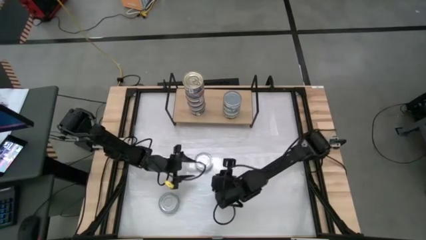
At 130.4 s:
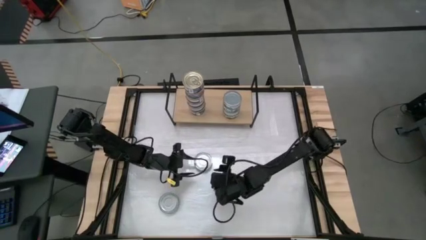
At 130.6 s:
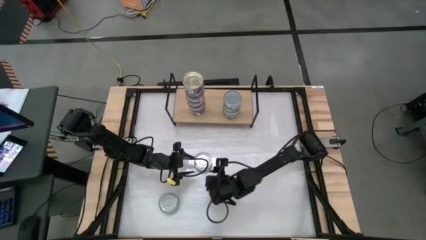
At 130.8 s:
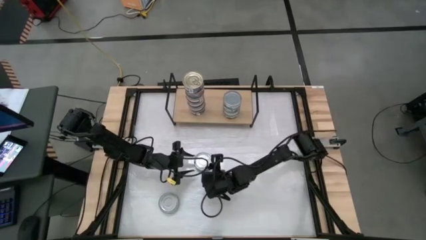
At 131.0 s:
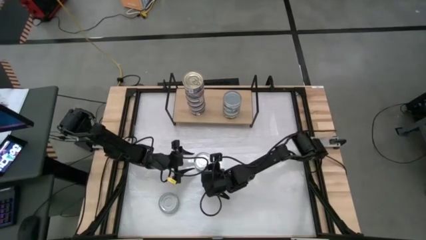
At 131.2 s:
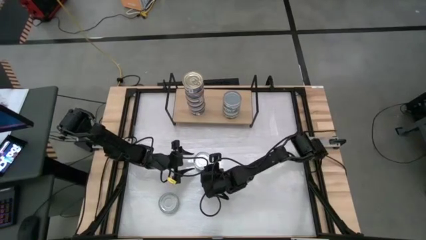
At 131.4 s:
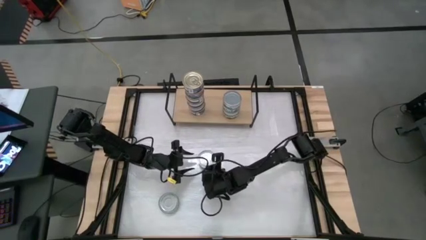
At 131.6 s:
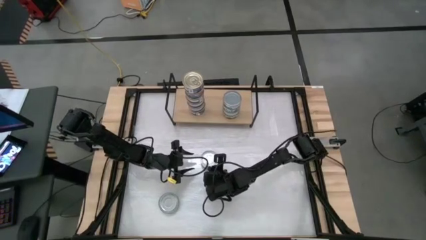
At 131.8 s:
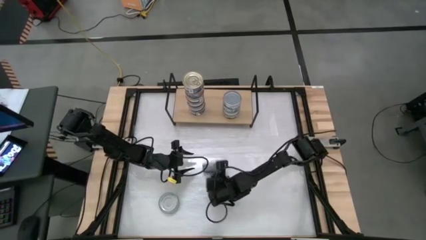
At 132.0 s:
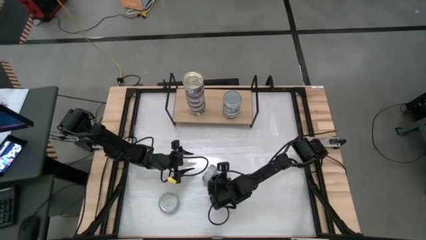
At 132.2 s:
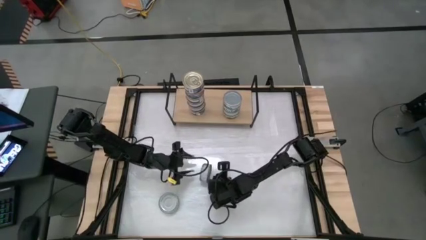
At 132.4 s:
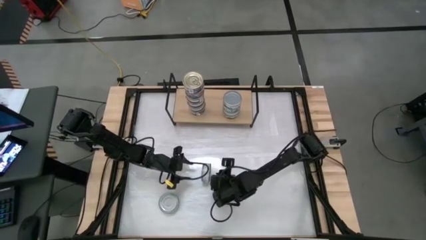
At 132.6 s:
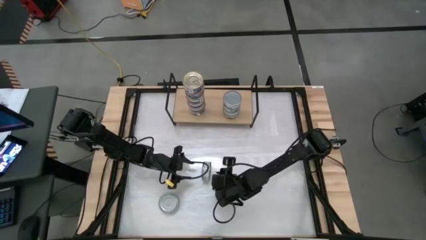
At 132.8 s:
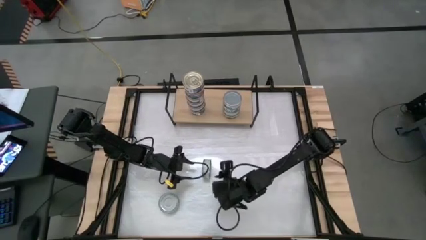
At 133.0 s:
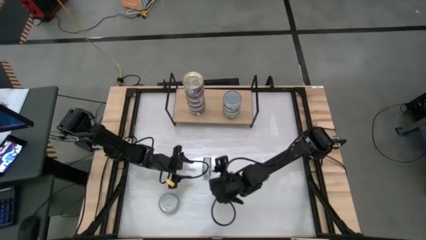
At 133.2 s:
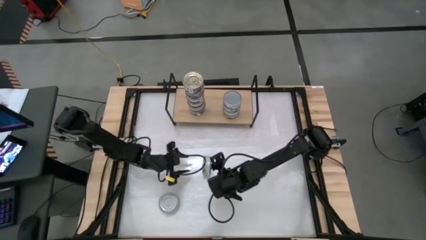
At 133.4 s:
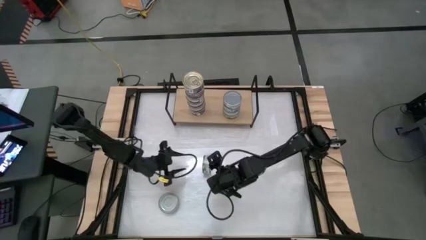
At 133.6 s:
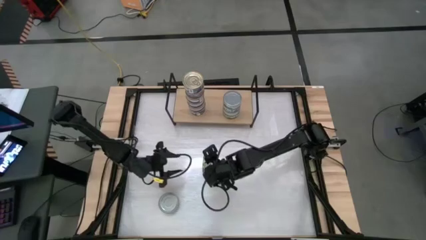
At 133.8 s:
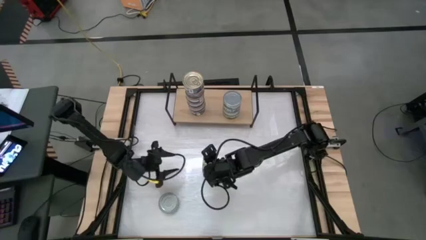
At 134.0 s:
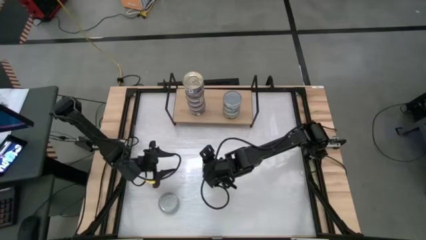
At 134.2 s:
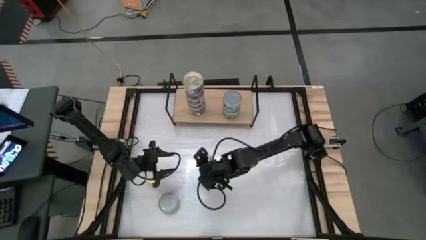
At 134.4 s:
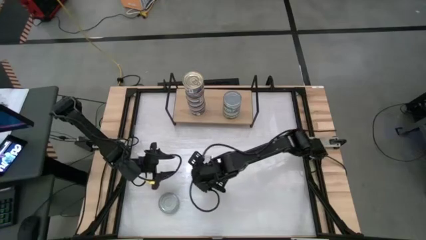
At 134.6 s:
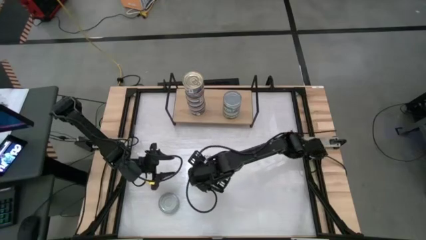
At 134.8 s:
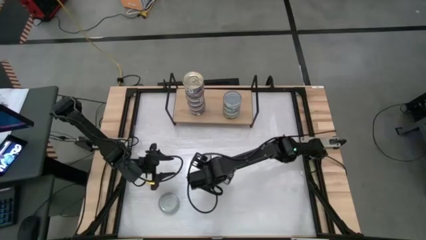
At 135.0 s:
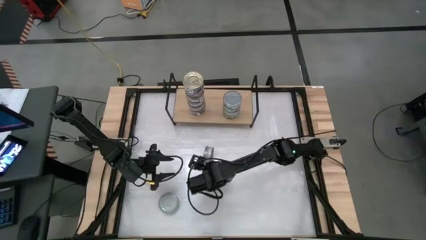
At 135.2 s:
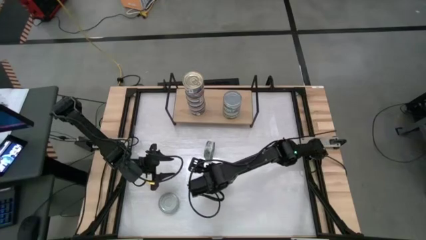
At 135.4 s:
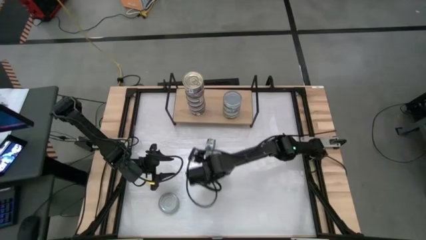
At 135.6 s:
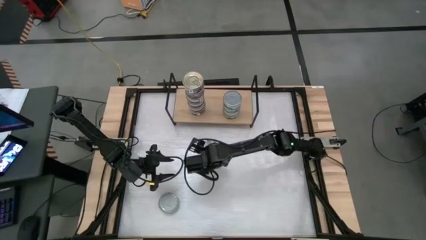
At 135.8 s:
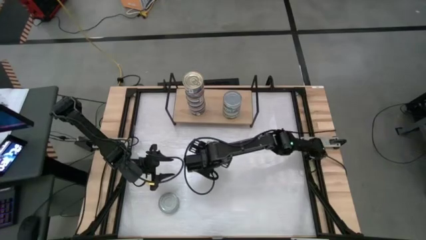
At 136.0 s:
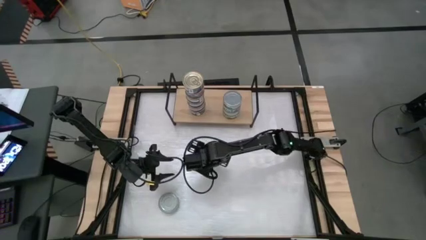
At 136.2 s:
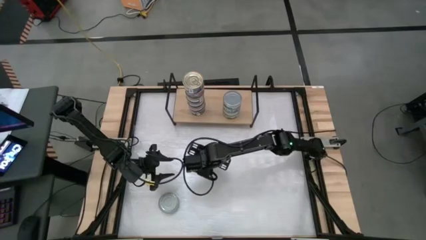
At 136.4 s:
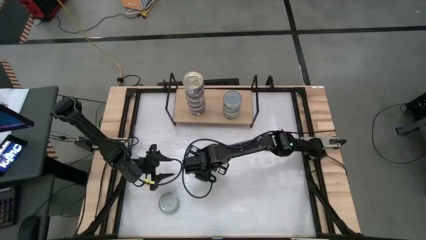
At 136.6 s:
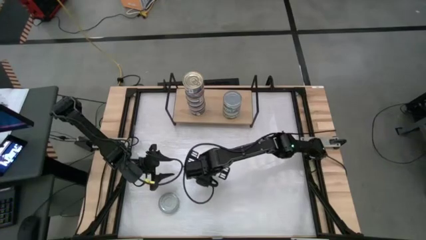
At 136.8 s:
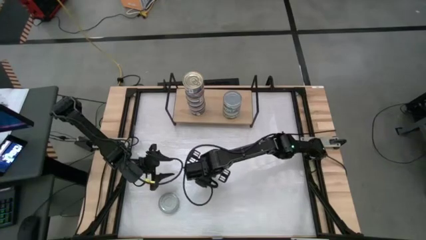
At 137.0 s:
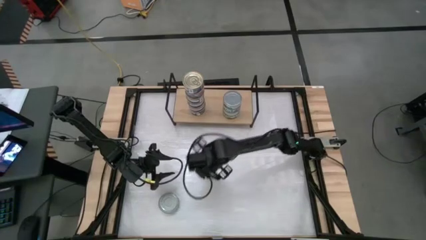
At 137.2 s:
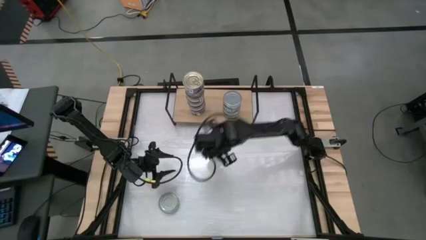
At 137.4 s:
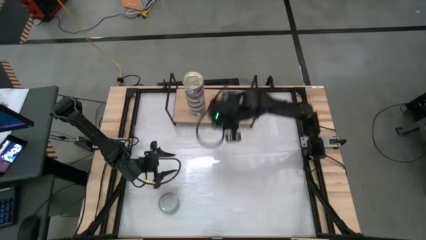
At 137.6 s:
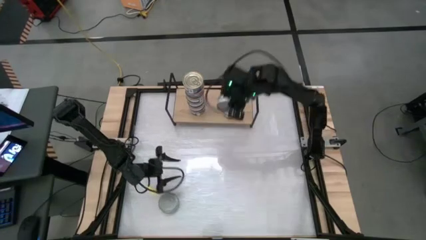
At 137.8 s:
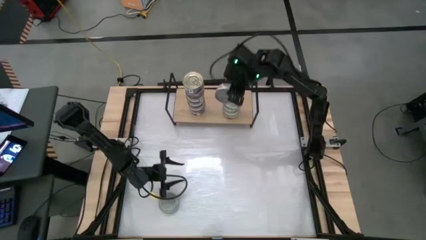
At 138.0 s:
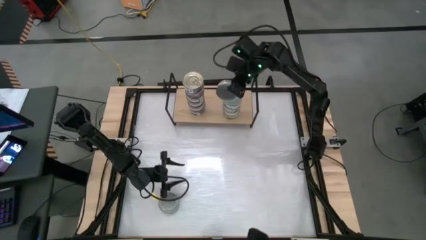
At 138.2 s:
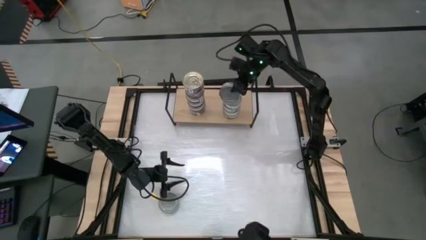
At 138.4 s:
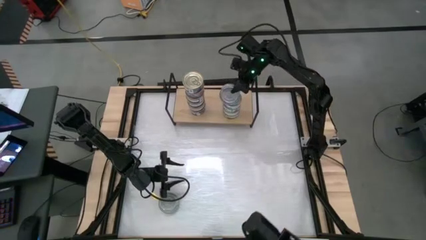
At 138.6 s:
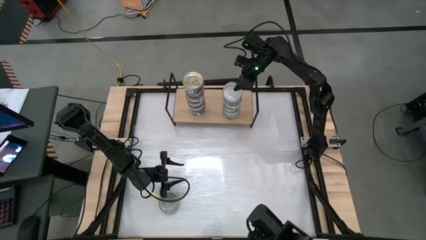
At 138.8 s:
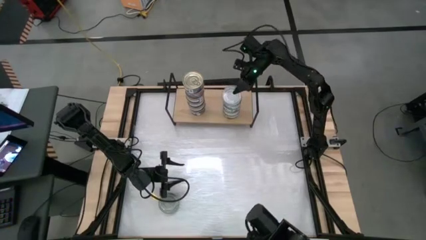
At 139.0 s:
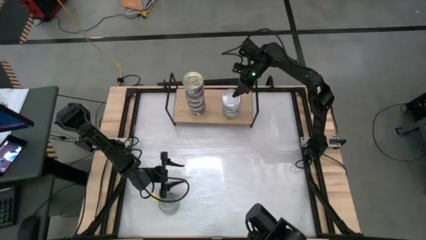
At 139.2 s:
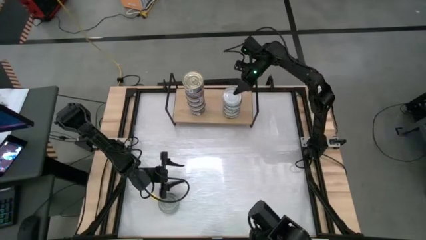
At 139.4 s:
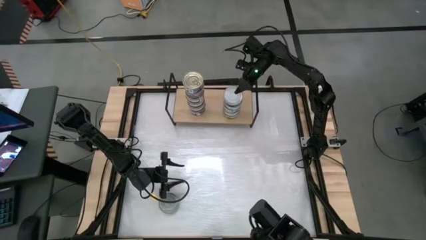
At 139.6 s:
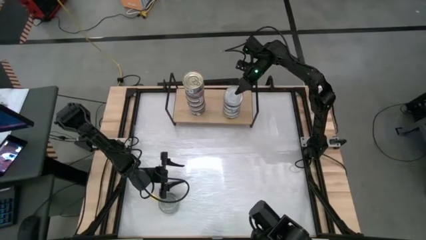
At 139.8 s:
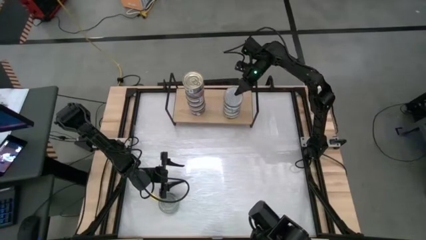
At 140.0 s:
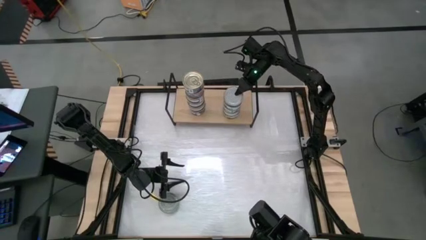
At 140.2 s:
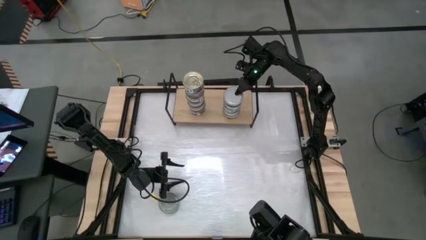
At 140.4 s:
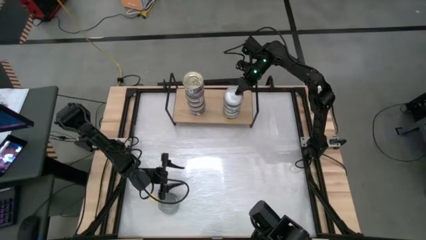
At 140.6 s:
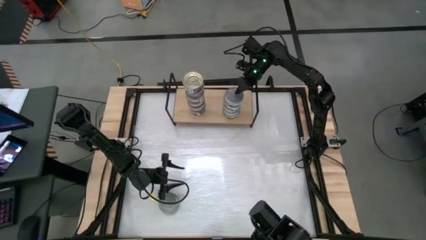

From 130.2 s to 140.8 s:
Task: Stack canned seafood by type on shelf
Stack the green tuna can on top of the other green tuna can on the shelf

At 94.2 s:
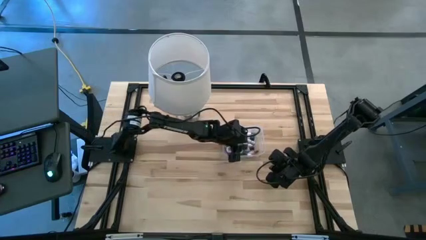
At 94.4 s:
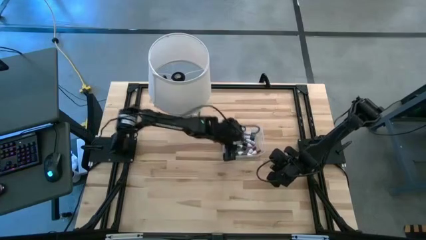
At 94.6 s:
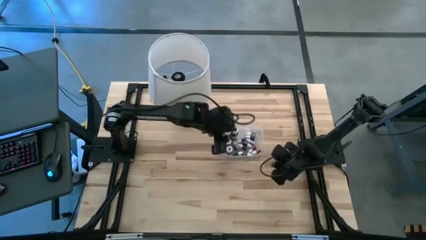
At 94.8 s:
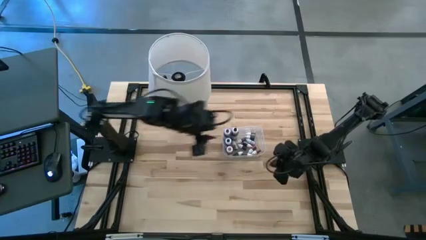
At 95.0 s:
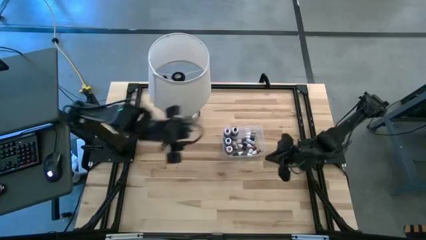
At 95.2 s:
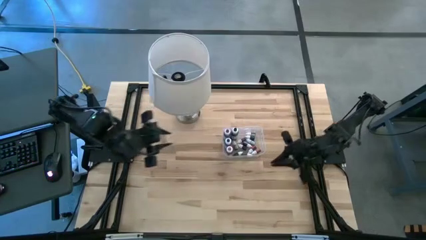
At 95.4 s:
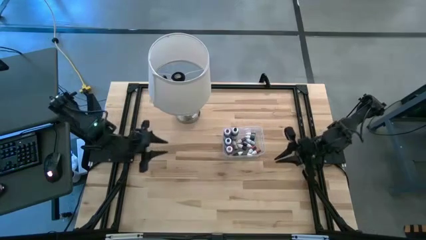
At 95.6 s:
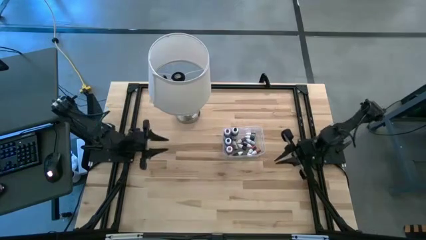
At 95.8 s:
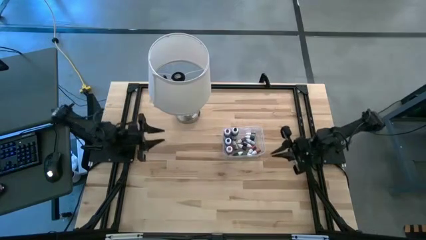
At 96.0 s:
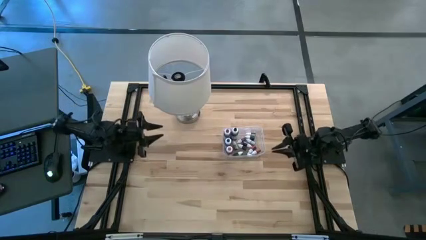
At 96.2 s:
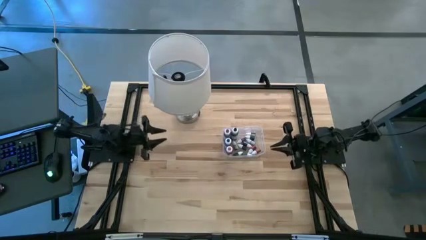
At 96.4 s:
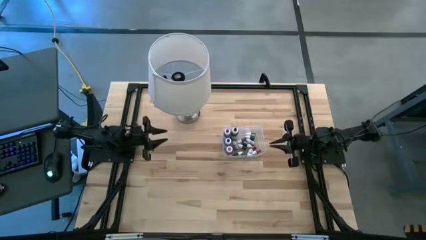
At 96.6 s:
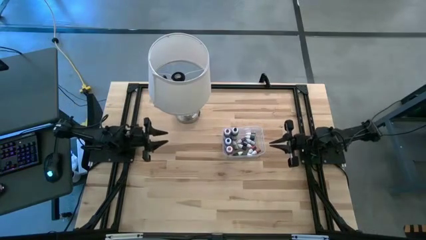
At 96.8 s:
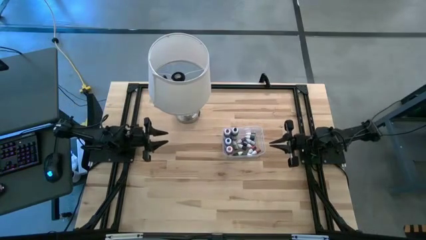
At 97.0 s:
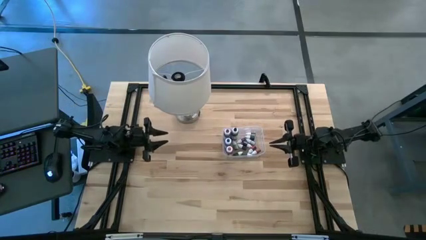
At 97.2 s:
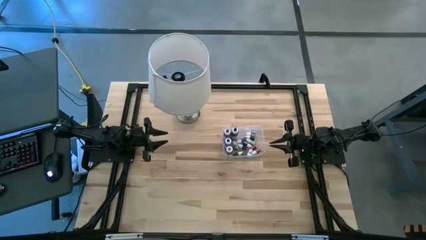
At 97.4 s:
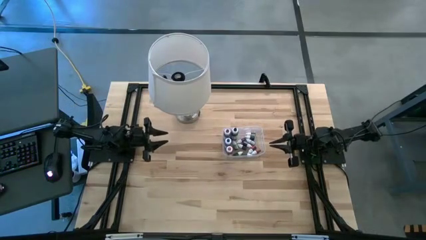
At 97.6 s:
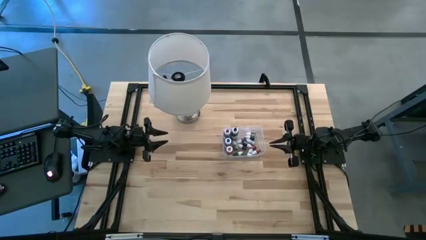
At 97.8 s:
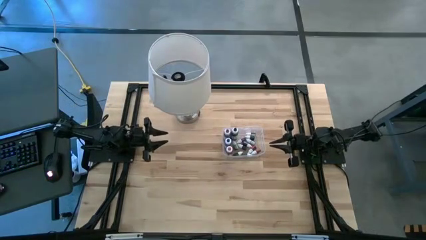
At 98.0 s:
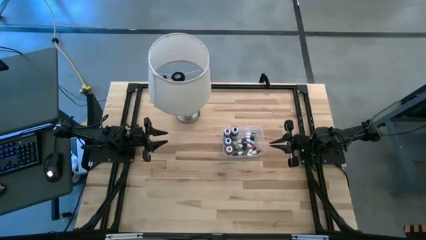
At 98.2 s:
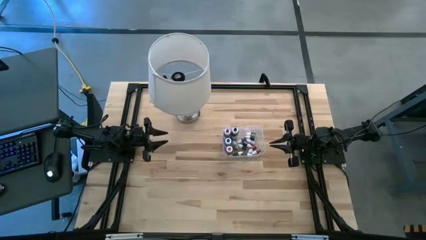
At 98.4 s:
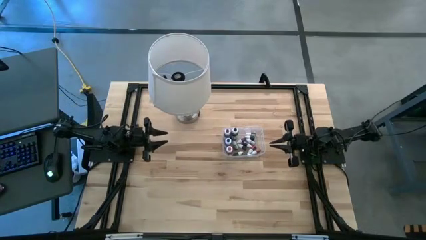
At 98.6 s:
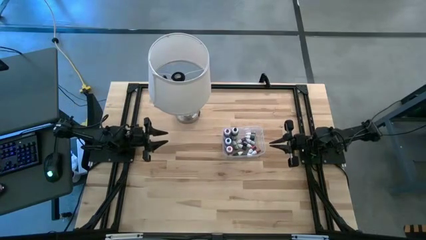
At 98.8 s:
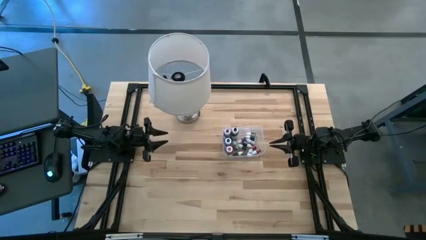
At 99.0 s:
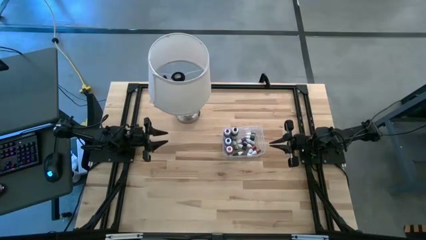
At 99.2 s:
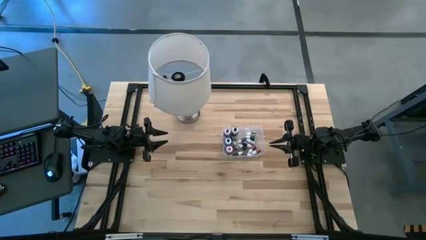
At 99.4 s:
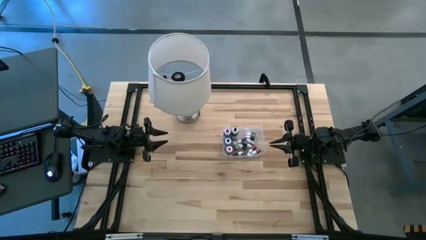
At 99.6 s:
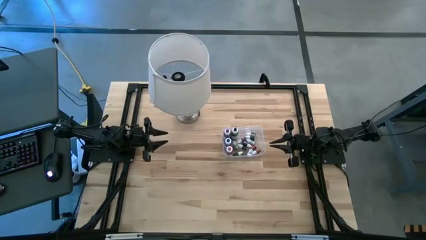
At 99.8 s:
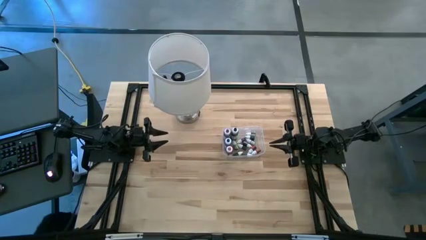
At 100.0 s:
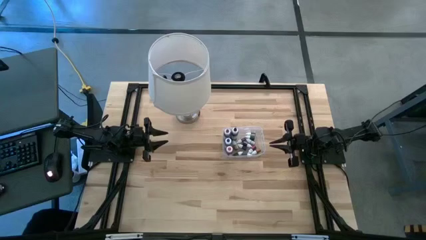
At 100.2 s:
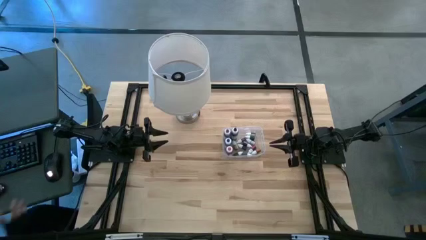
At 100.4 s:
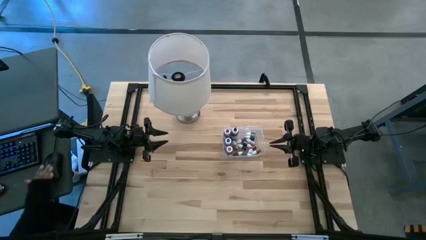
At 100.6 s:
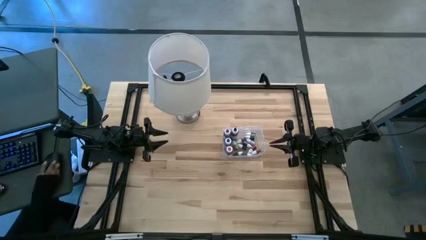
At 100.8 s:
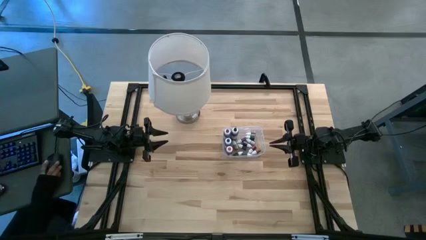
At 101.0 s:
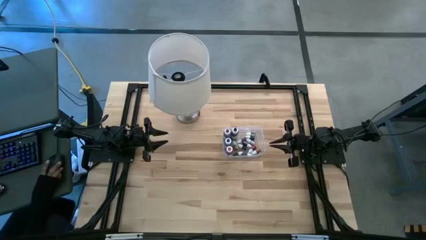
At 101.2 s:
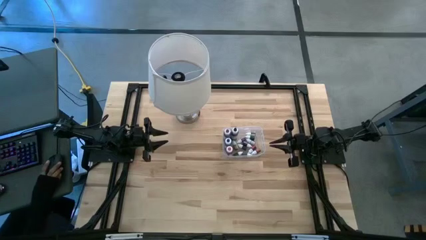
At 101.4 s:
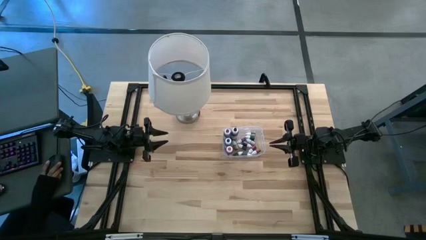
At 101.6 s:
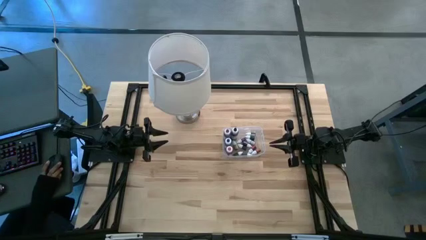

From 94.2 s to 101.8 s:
Task: Pick & Place food coloring
Return to Home Position
